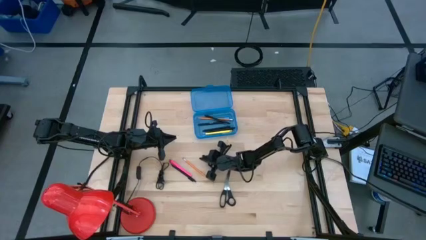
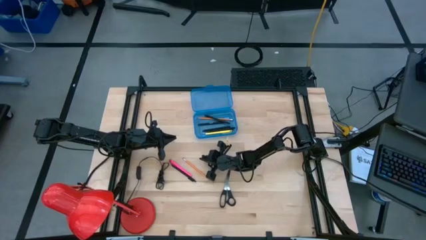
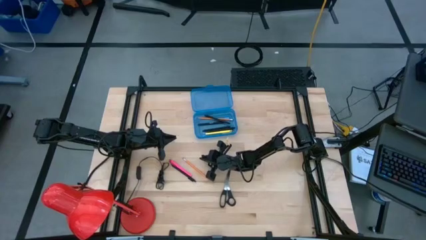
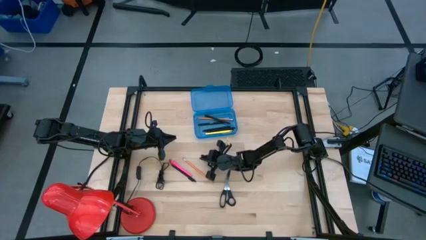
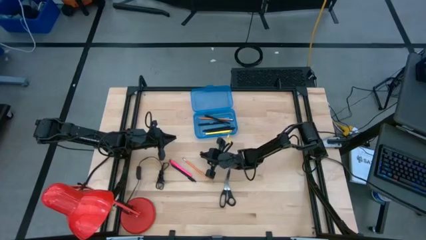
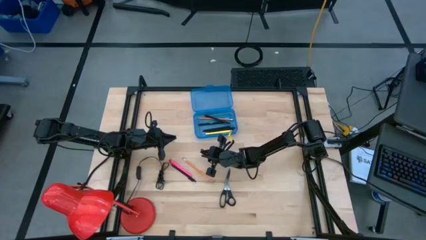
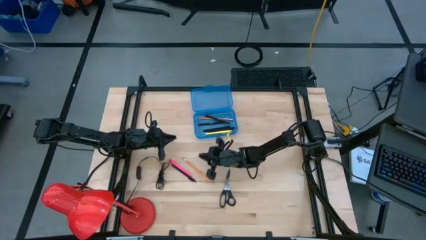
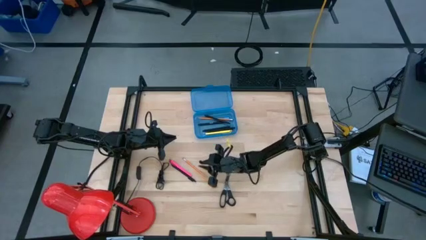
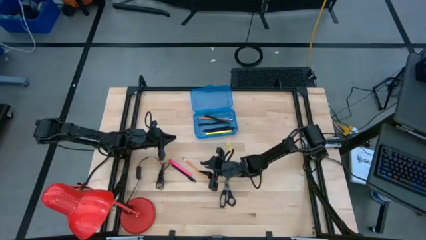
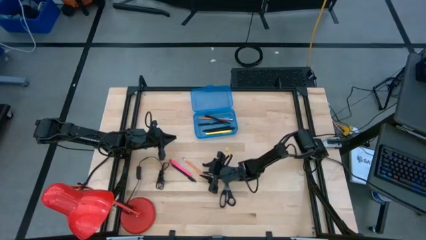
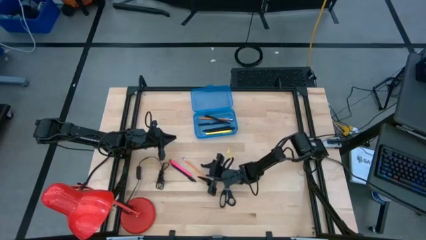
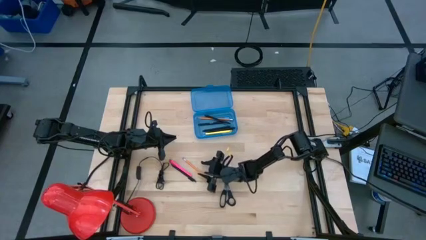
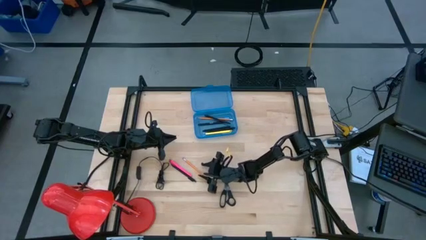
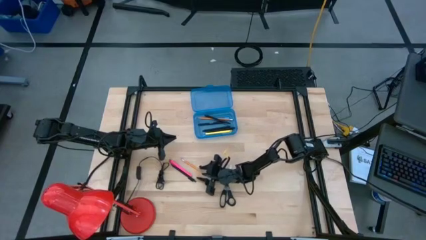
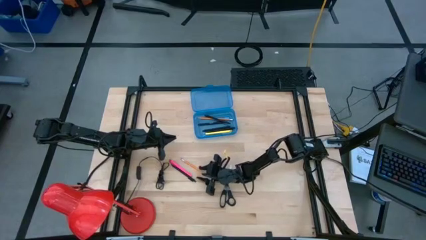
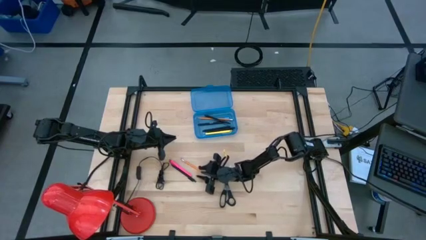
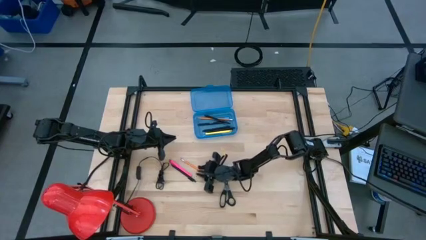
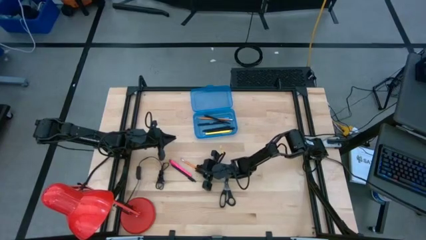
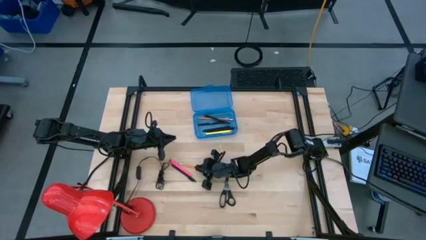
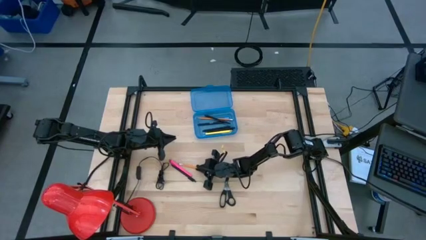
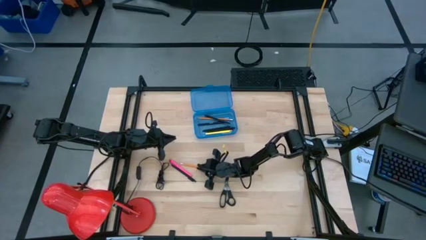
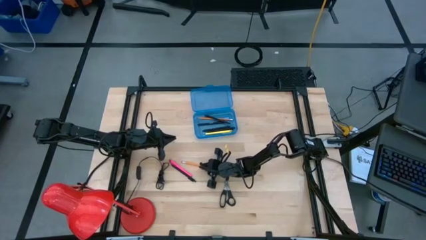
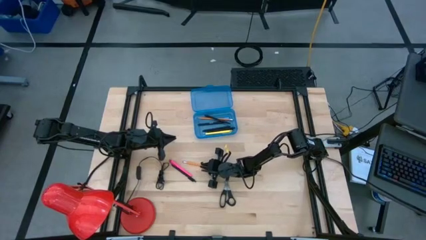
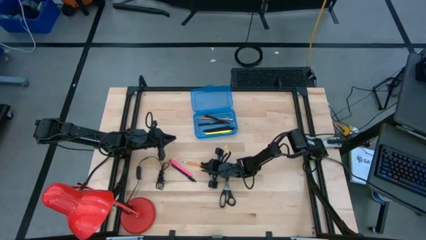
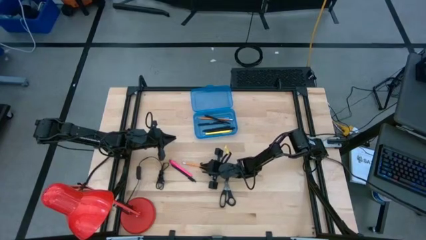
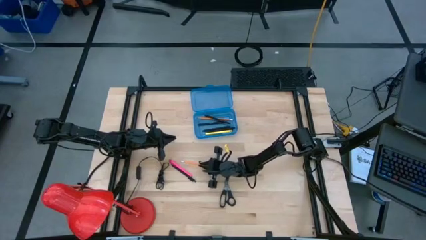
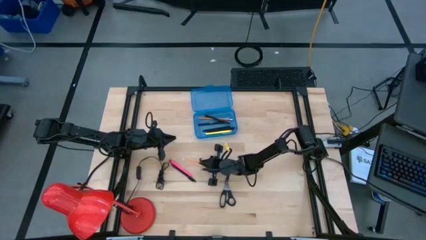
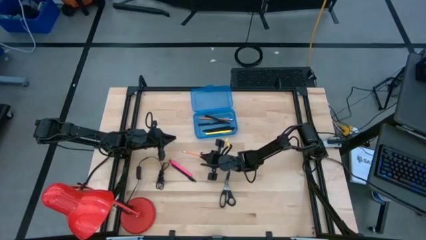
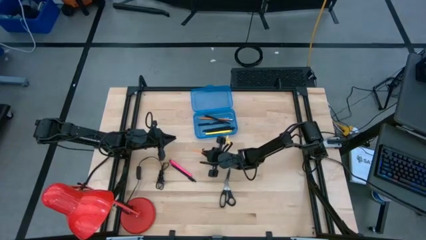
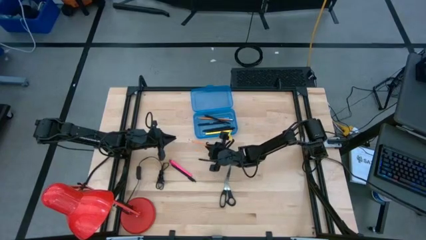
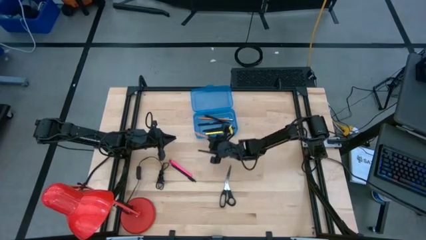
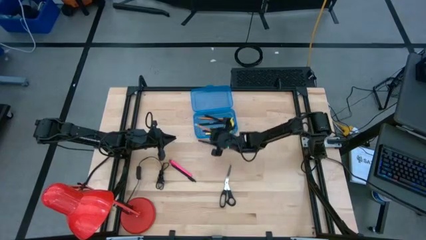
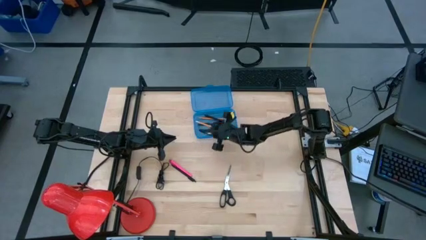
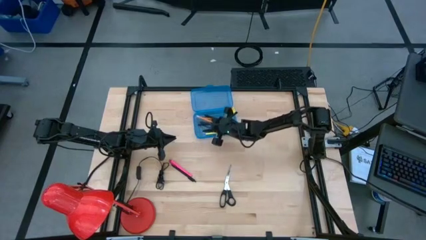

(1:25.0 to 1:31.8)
Task: Pick & place school supplies into a supply box
Put the orange pencil into the blue supply box

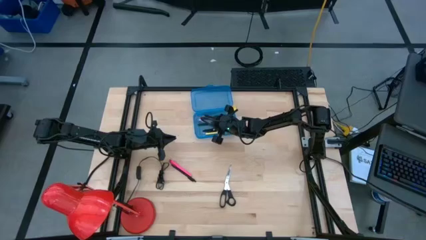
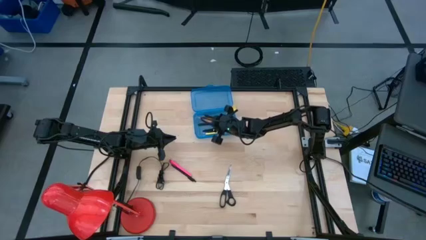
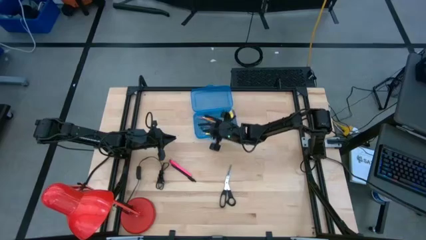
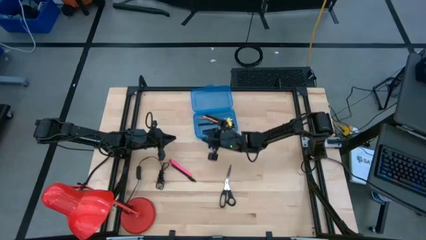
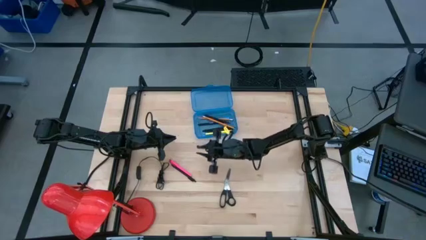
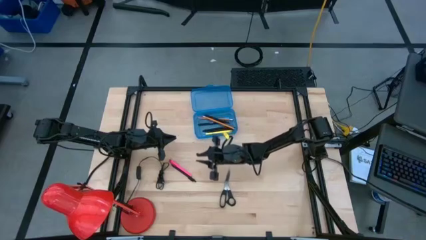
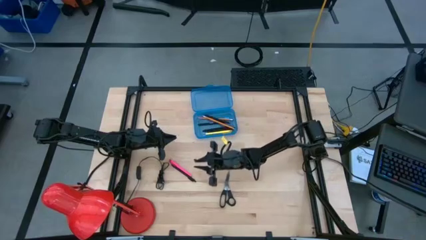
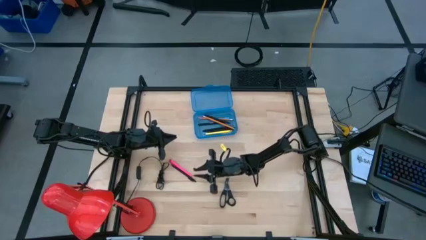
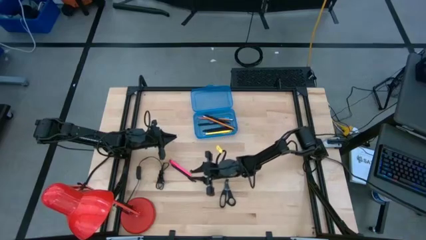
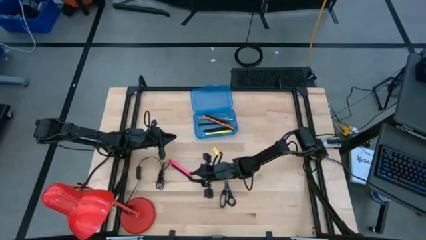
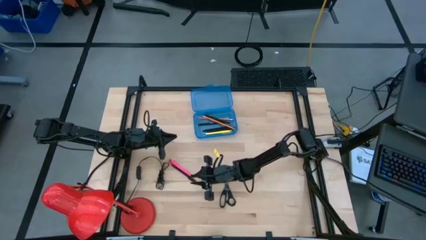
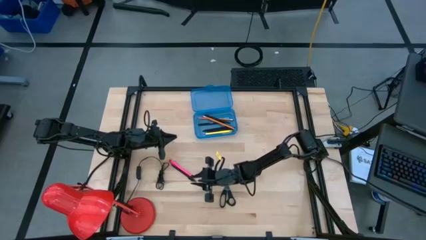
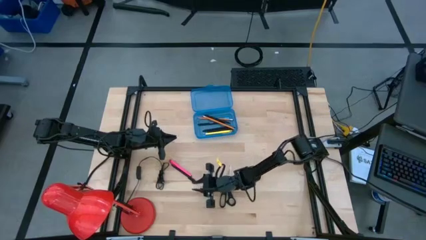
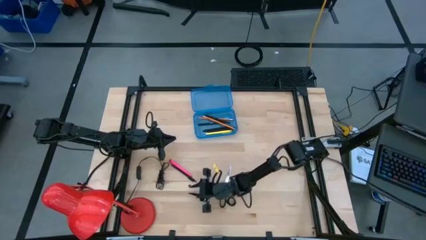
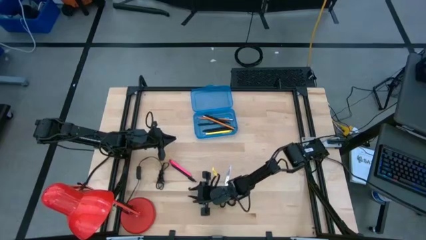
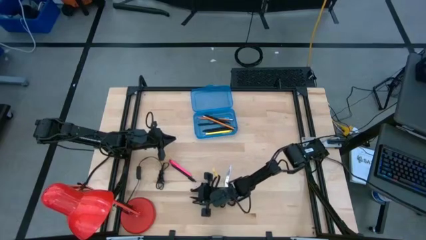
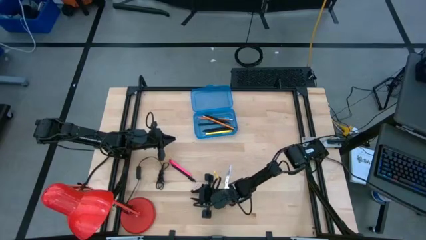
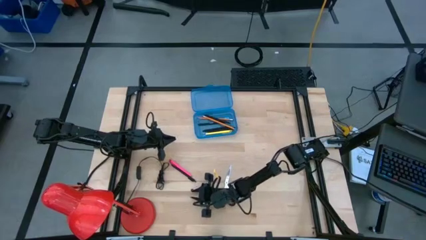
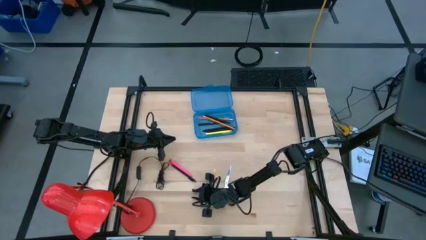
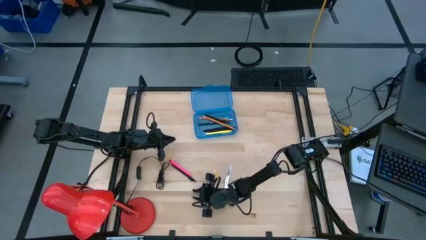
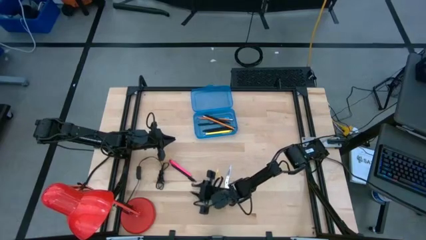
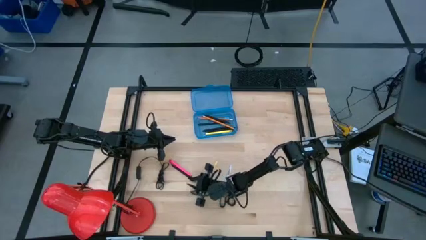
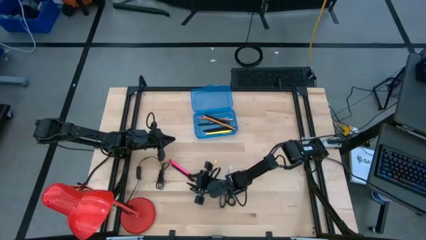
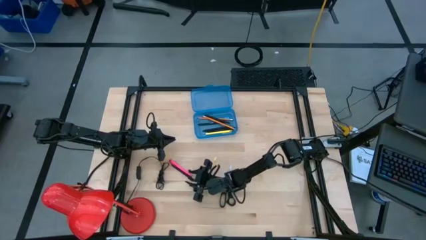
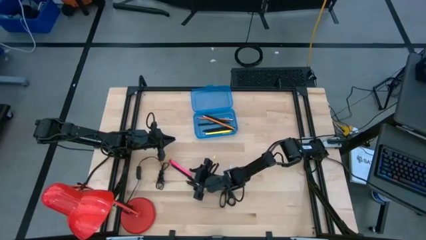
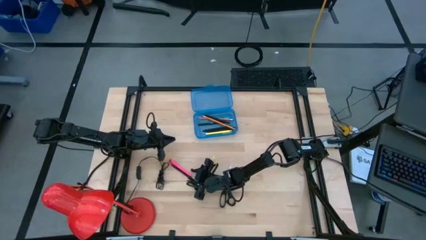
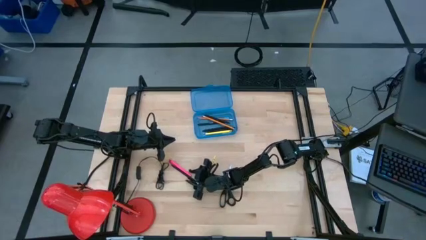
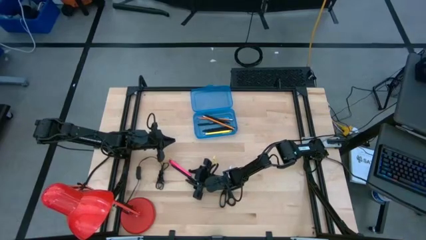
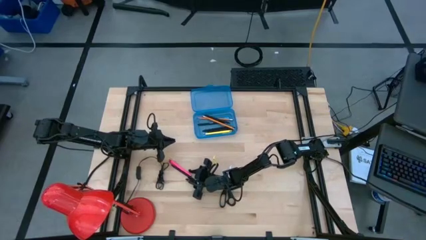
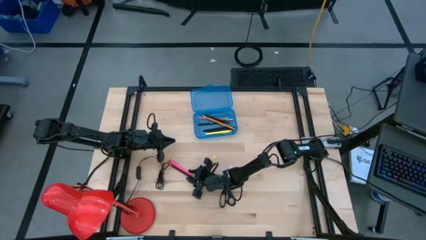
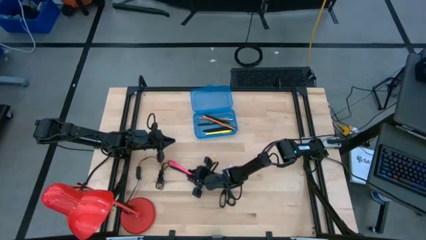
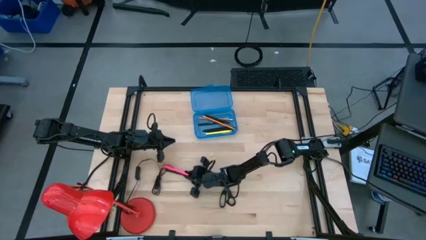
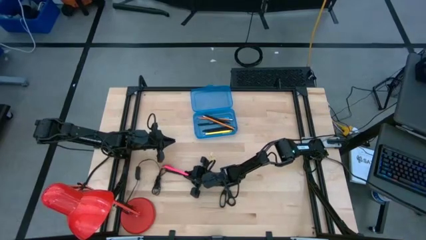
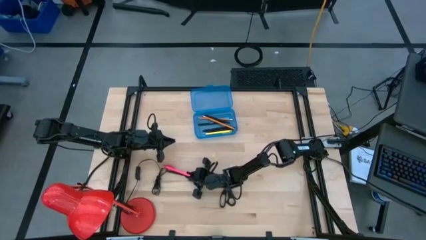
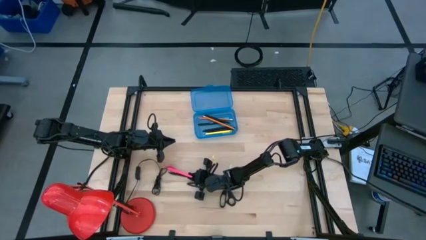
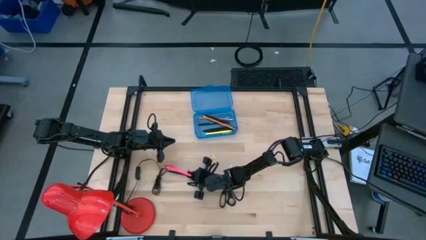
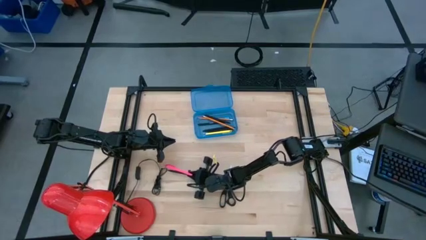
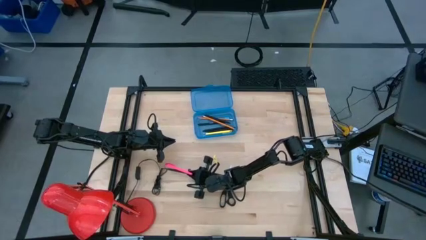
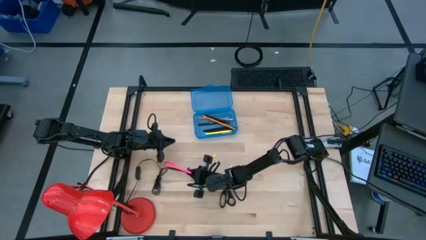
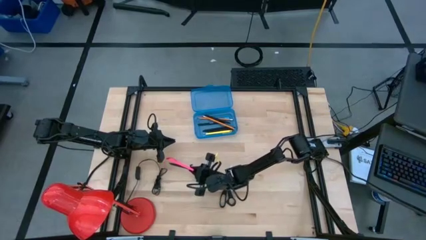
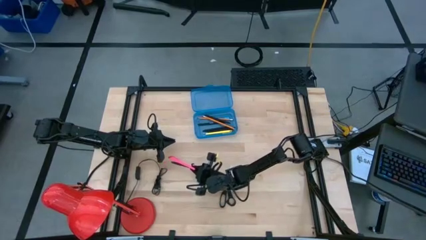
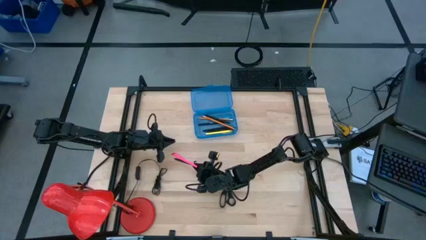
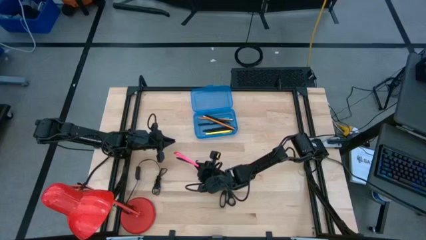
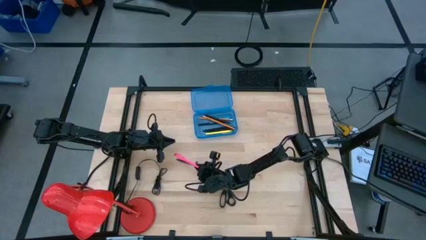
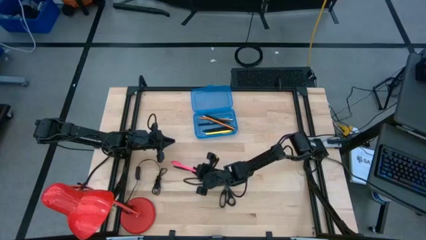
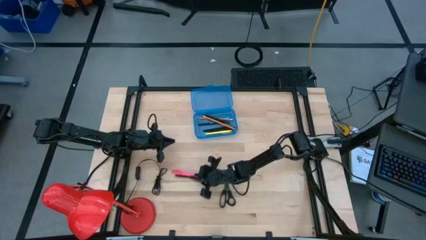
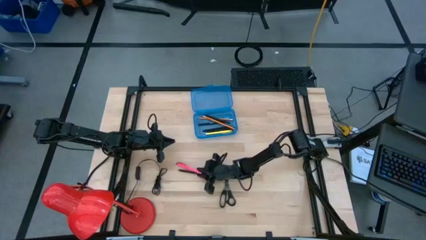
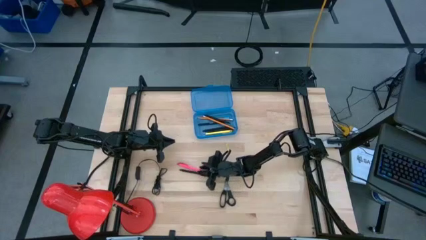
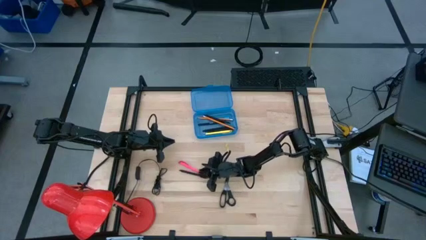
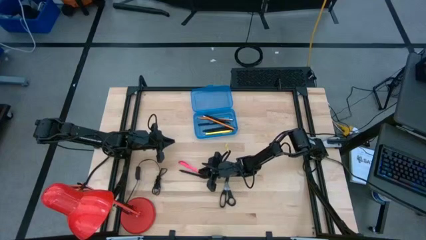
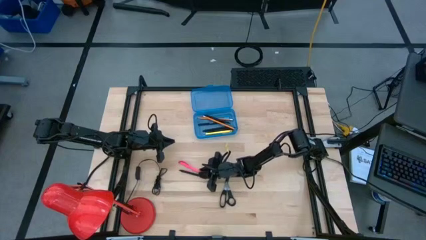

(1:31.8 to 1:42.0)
Put the pink pen into the blue supply box
